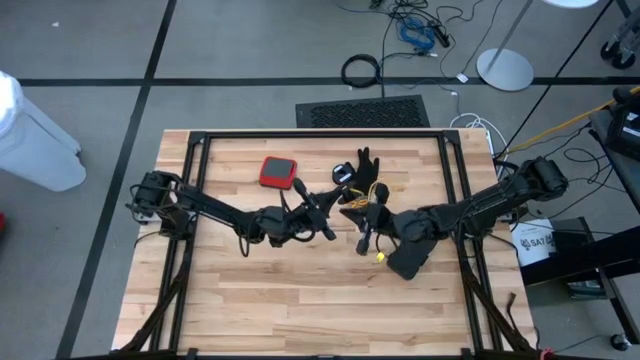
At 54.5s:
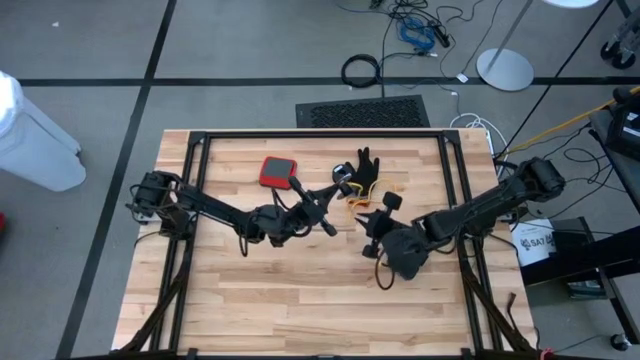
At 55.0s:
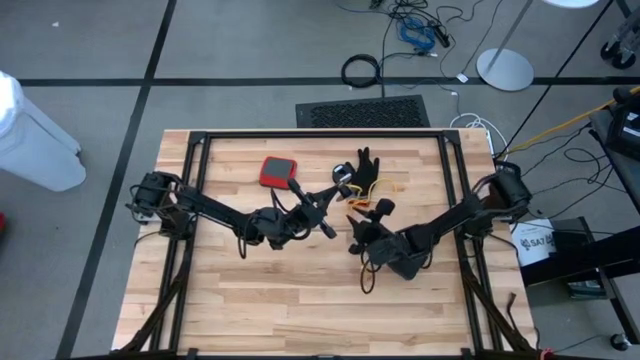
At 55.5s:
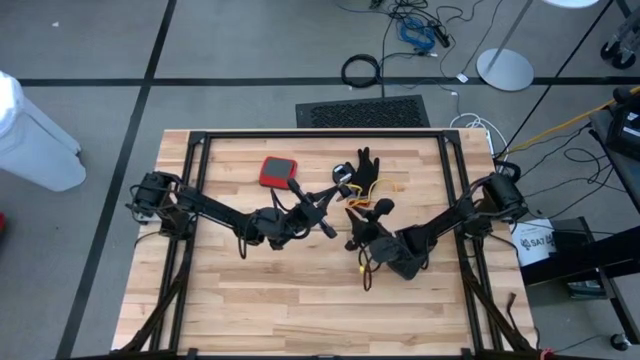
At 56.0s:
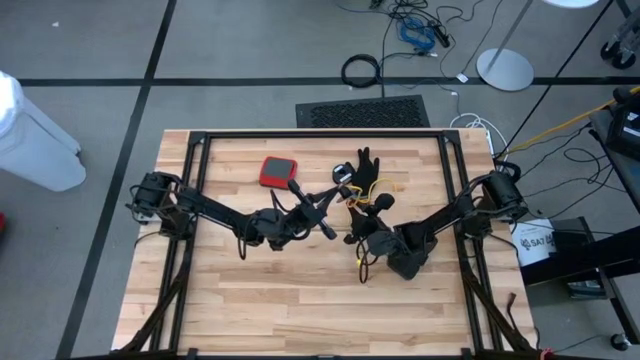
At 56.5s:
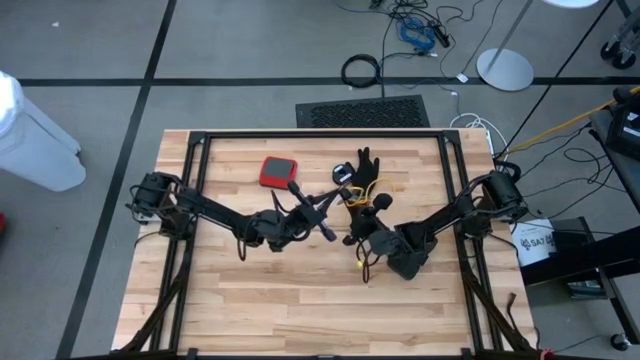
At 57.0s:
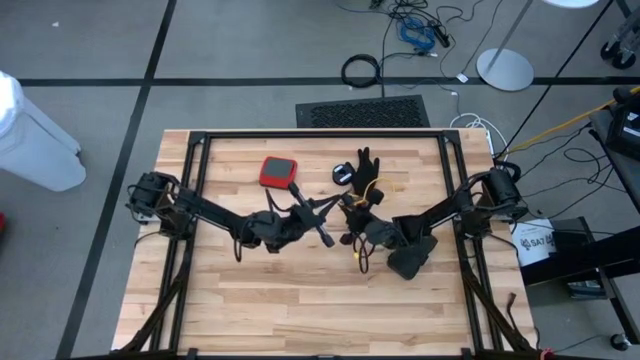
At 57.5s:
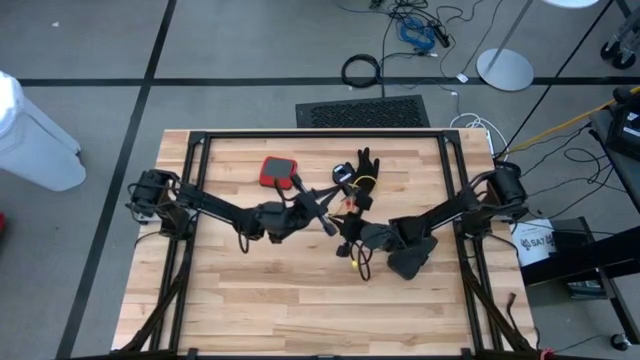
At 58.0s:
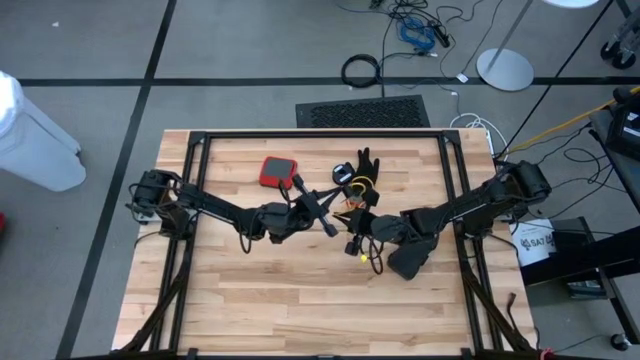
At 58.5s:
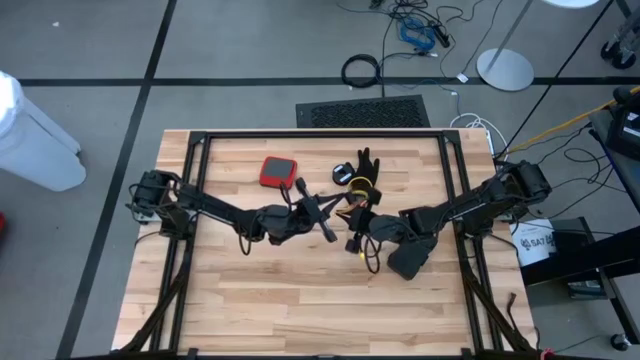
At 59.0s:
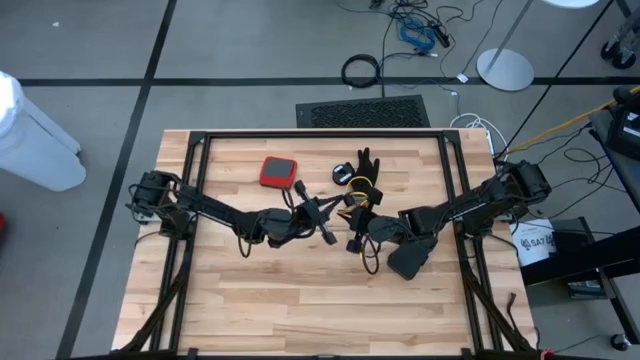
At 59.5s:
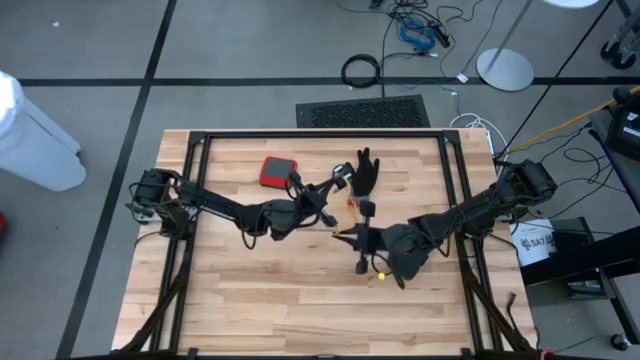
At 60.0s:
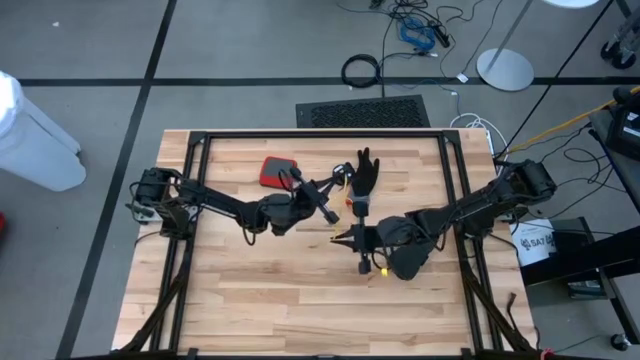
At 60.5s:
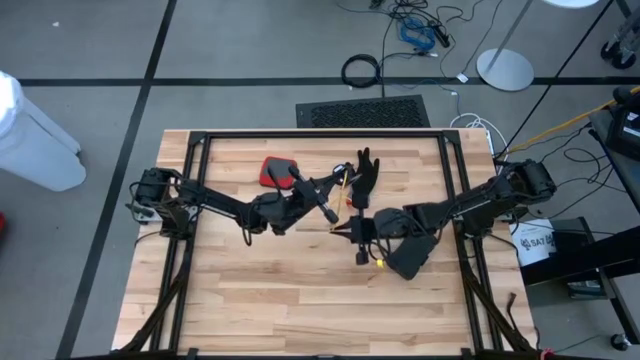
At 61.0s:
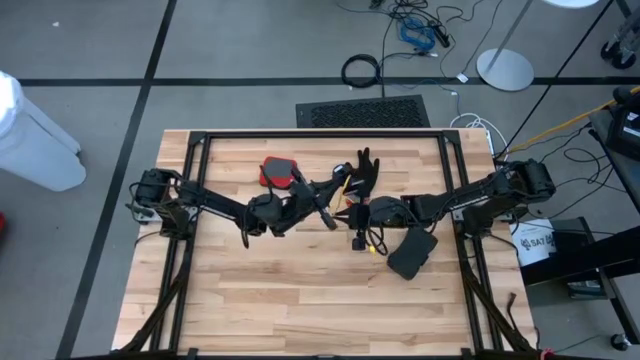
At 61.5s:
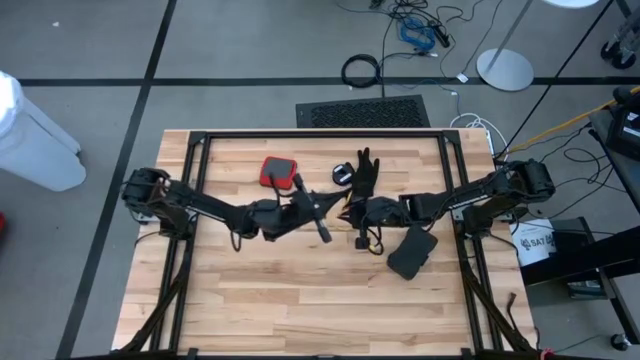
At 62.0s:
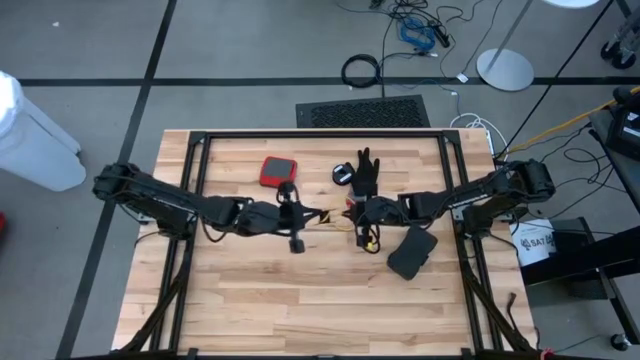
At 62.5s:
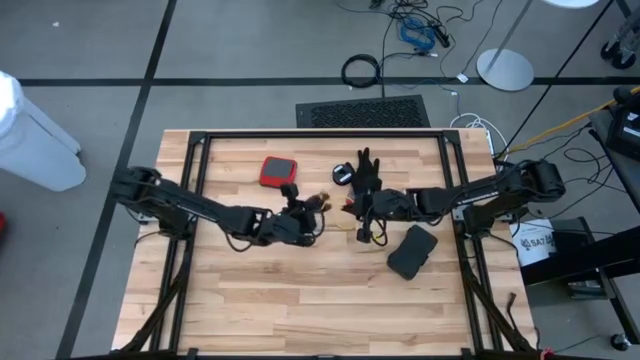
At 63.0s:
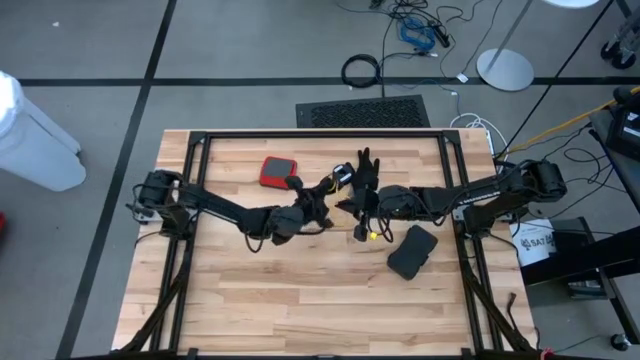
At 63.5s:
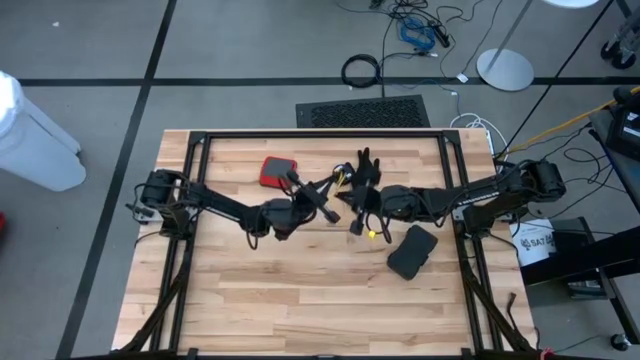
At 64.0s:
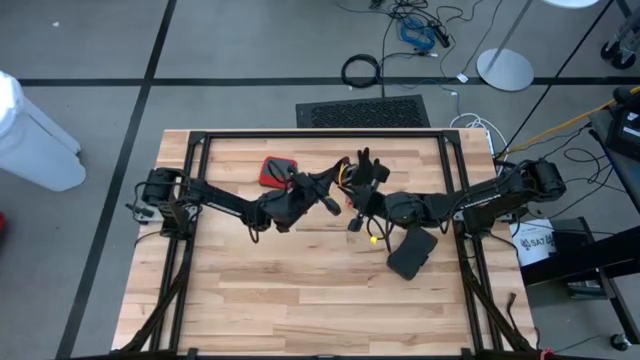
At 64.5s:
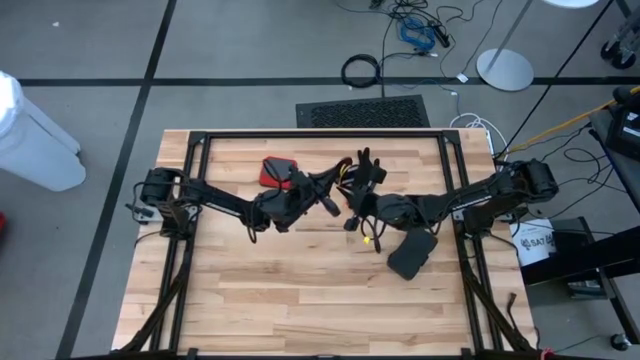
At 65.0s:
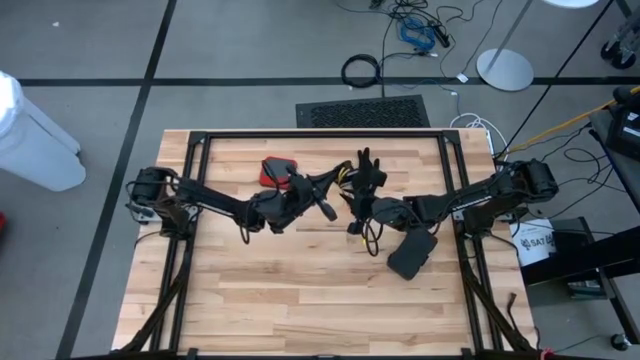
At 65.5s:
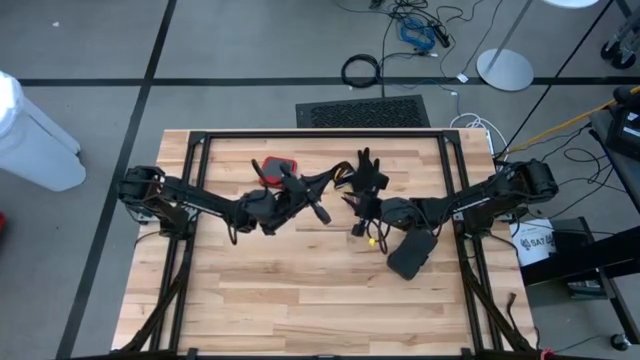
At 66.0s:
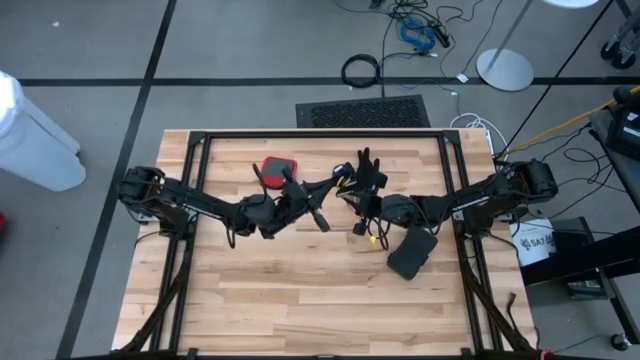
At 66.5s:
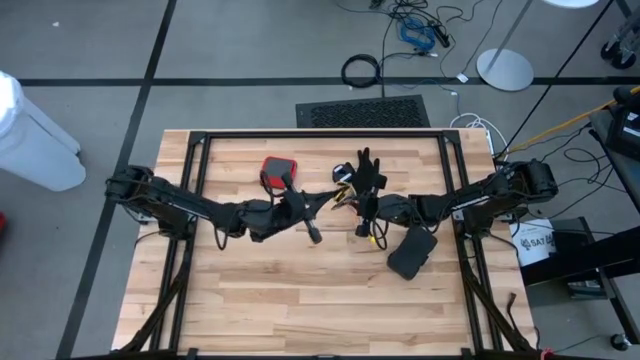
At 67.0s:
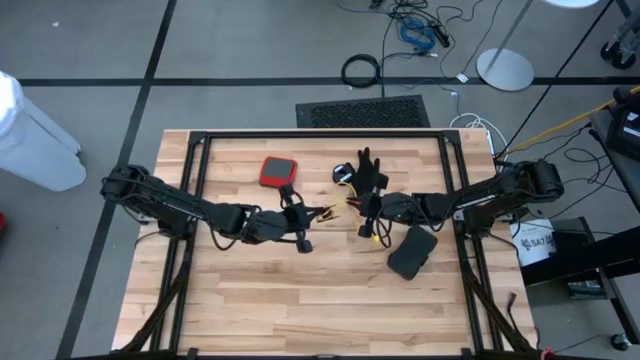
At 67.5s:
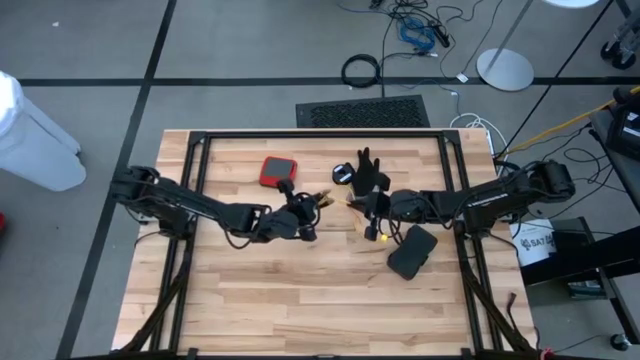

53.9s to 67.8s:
Task: Coil cords
Coil the yellow wire onto spool
